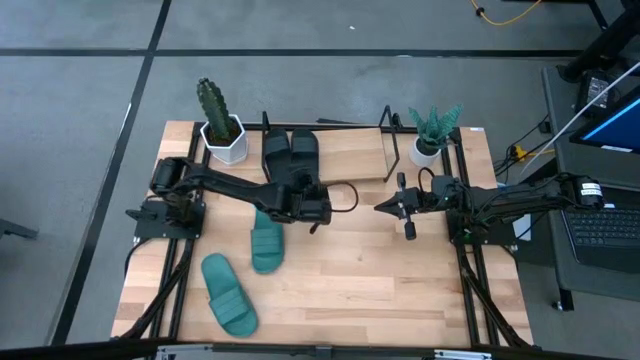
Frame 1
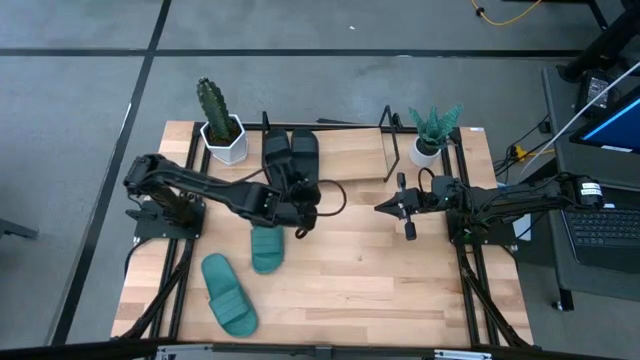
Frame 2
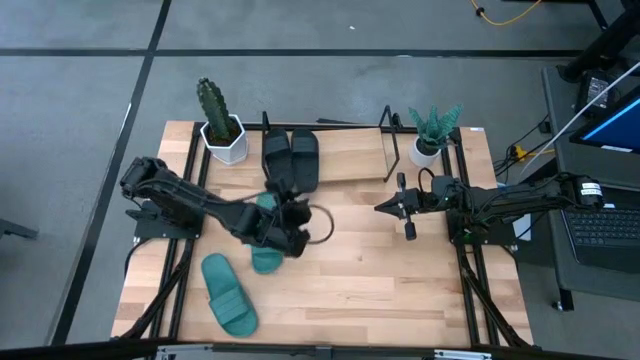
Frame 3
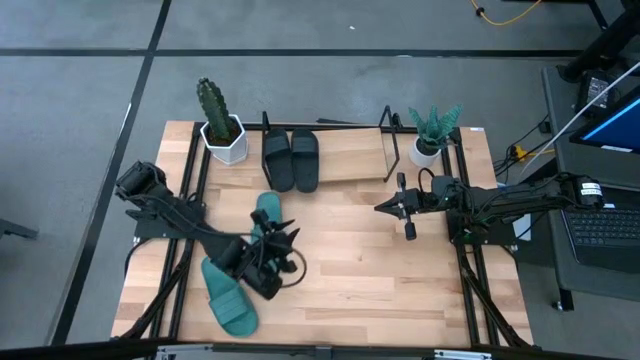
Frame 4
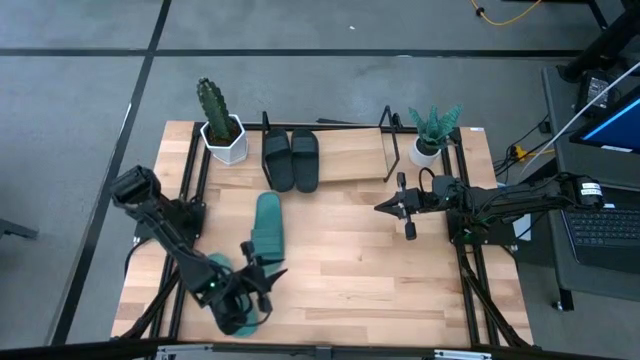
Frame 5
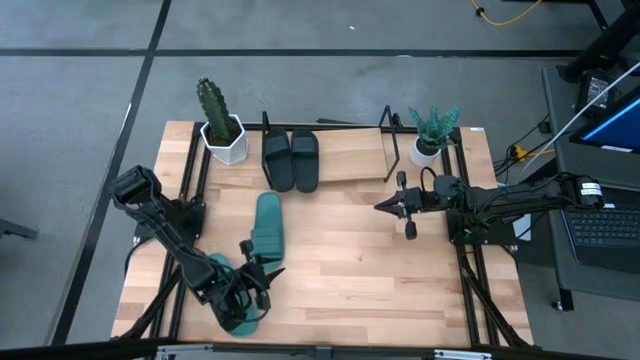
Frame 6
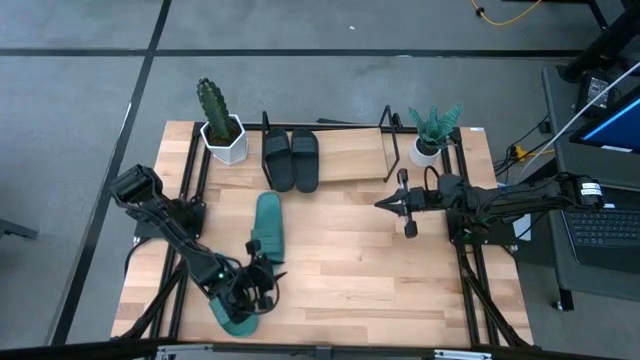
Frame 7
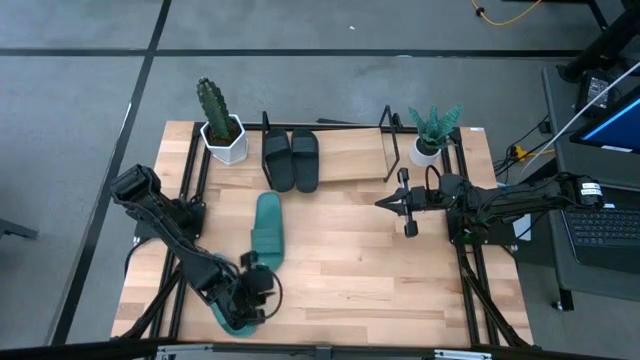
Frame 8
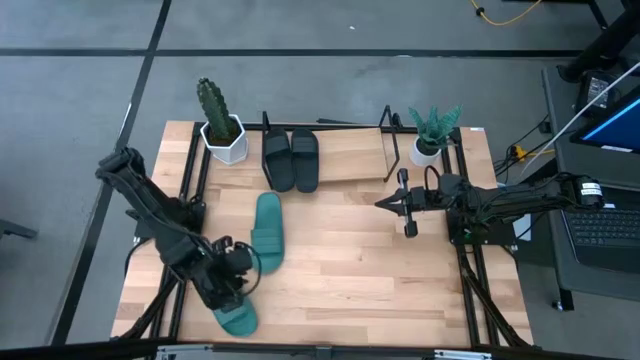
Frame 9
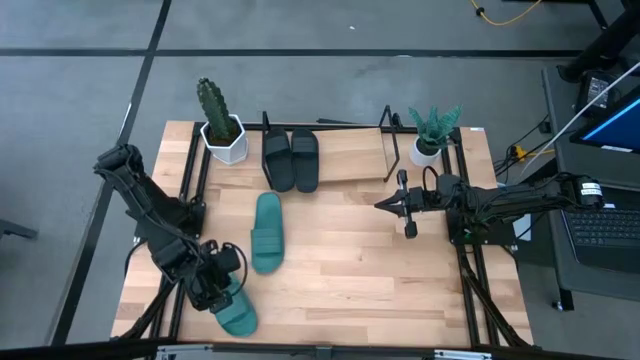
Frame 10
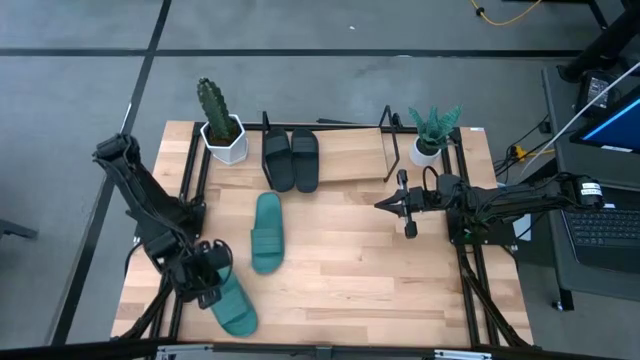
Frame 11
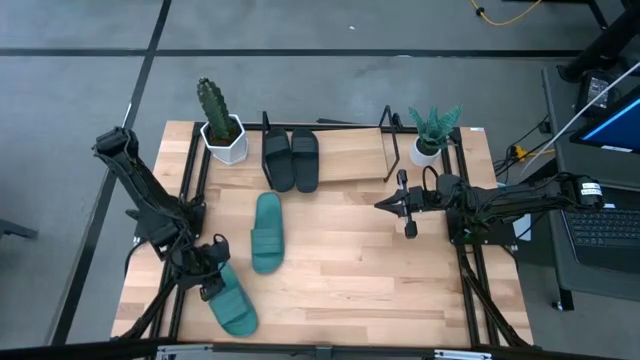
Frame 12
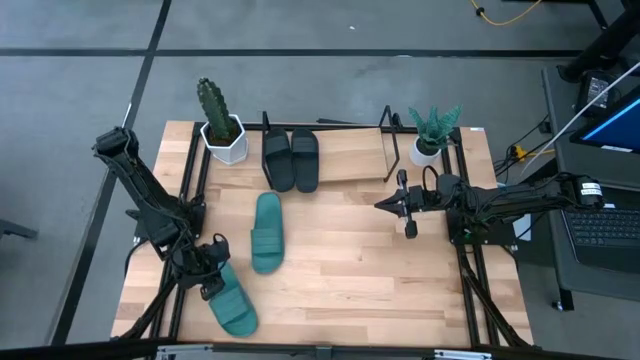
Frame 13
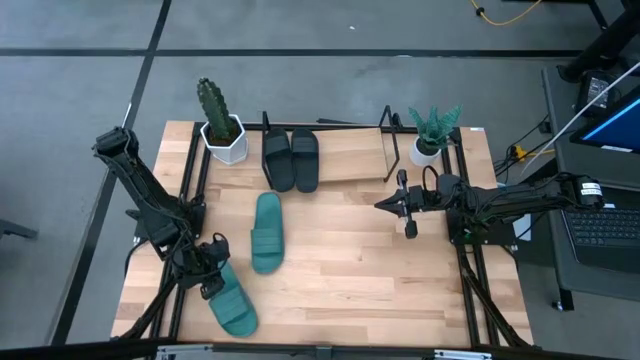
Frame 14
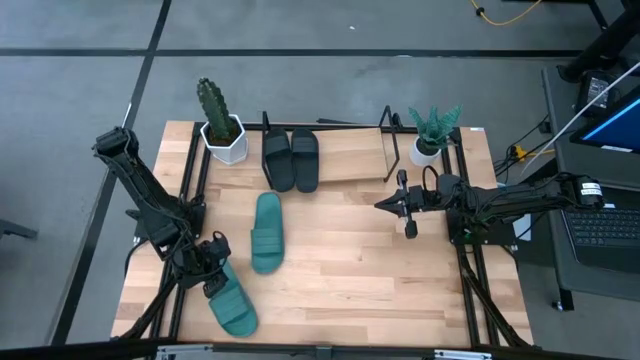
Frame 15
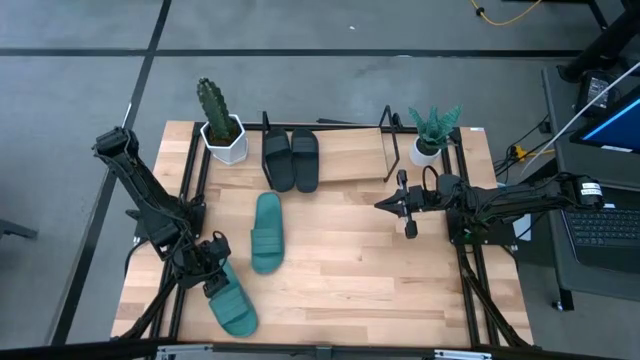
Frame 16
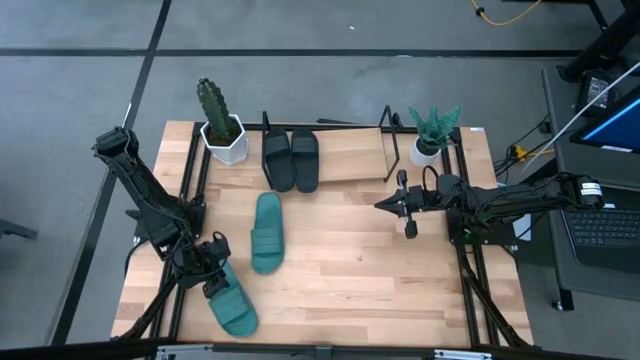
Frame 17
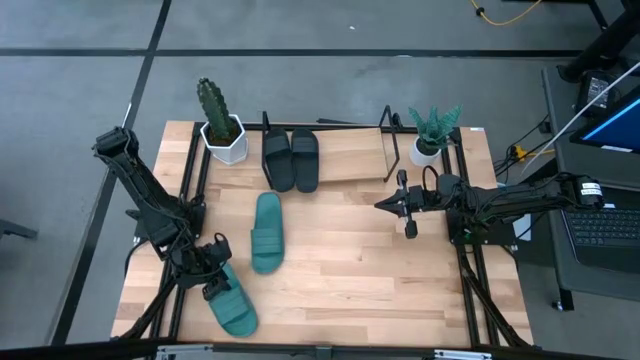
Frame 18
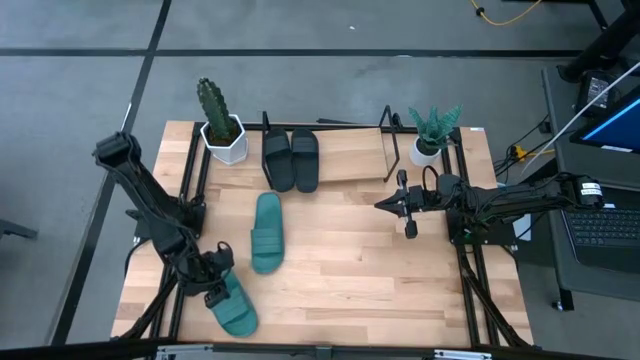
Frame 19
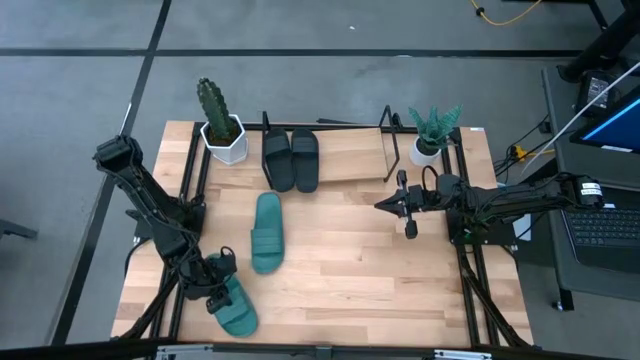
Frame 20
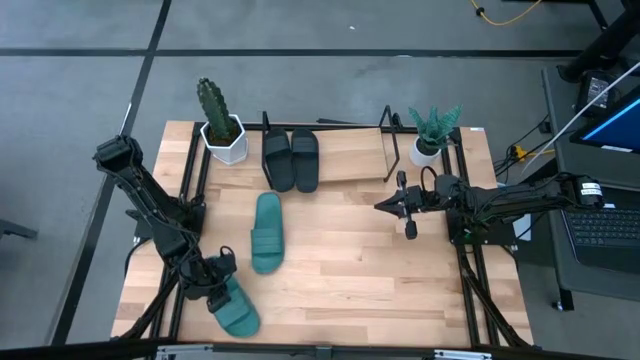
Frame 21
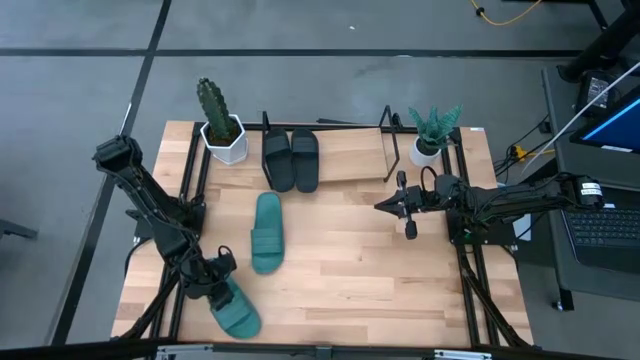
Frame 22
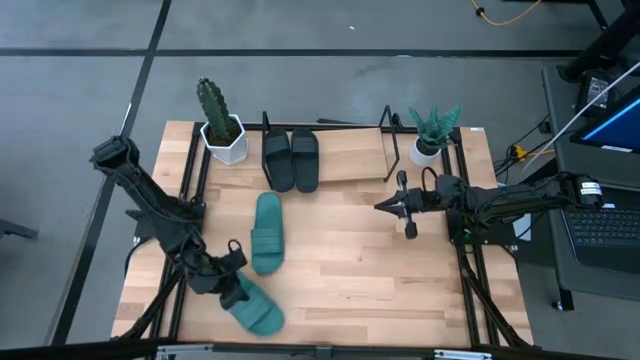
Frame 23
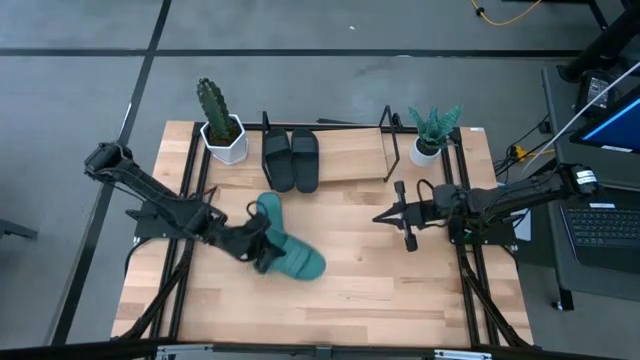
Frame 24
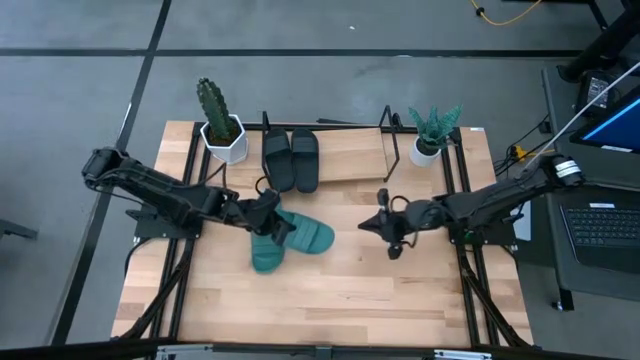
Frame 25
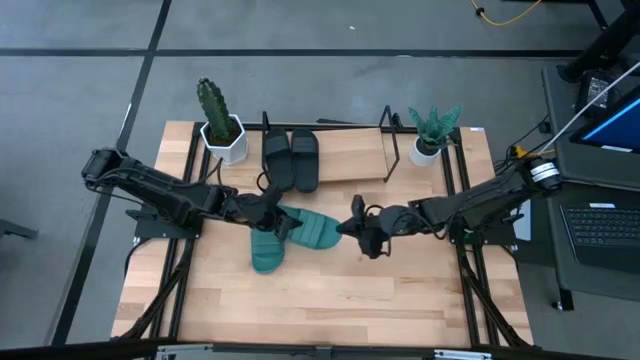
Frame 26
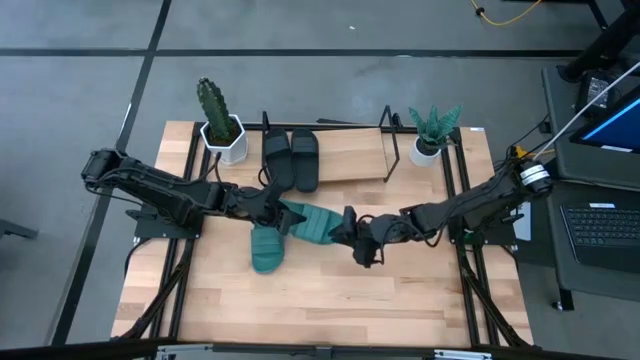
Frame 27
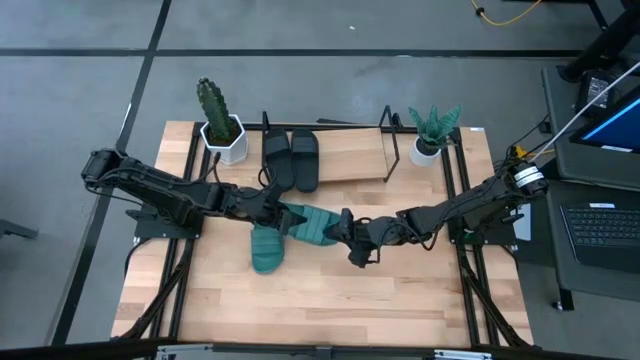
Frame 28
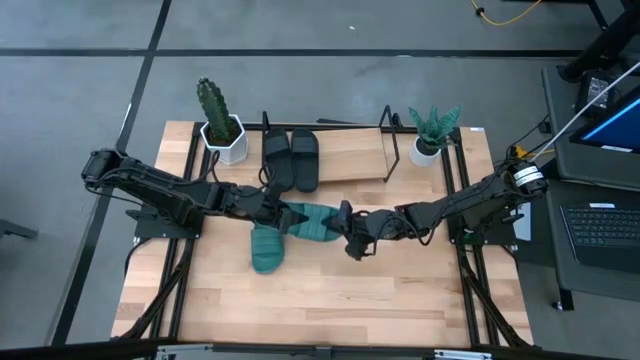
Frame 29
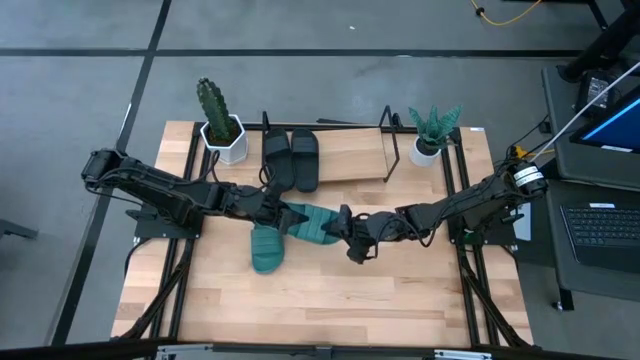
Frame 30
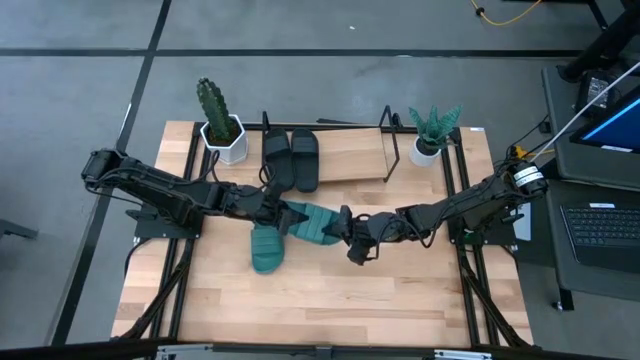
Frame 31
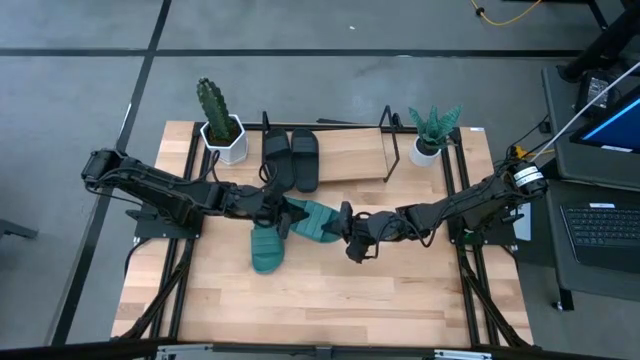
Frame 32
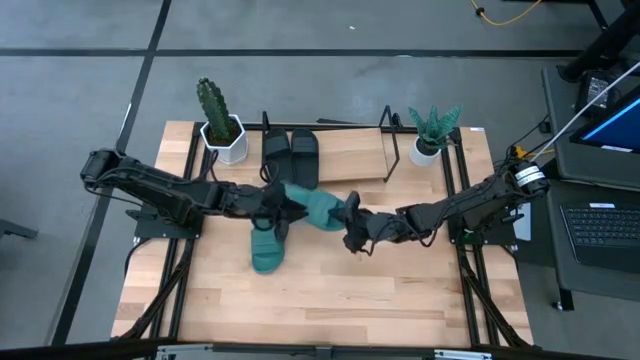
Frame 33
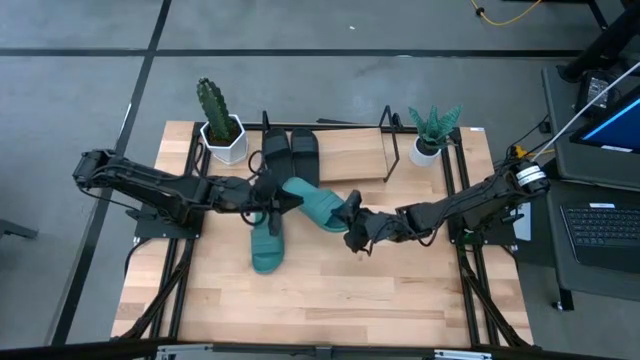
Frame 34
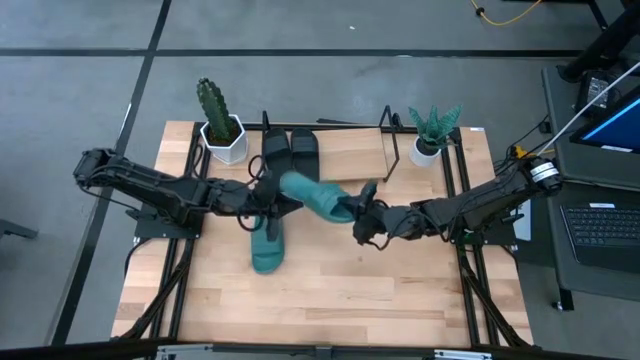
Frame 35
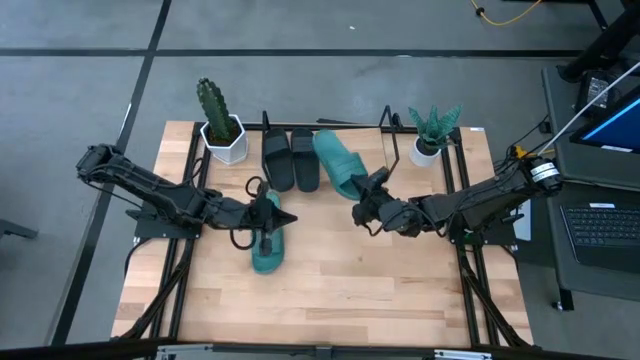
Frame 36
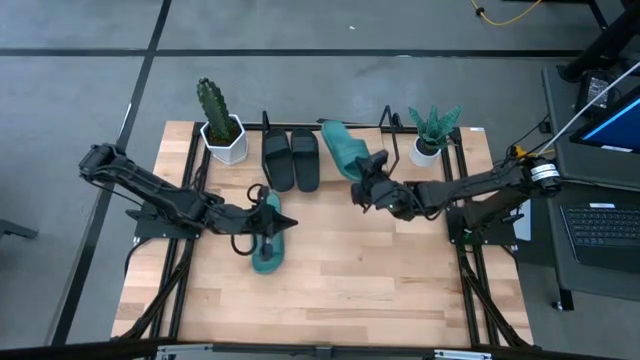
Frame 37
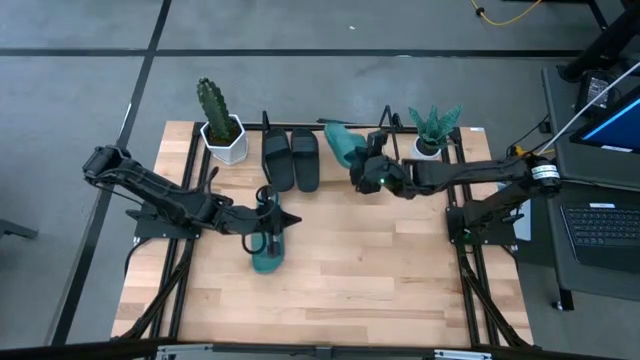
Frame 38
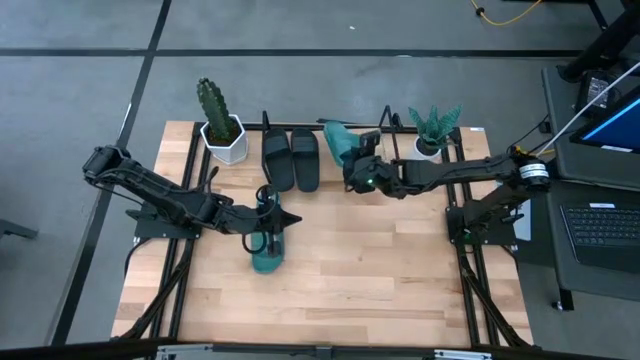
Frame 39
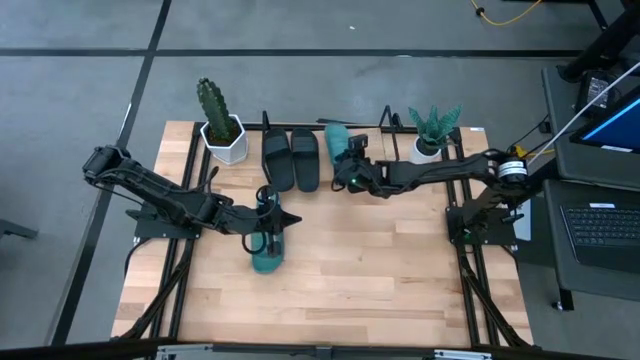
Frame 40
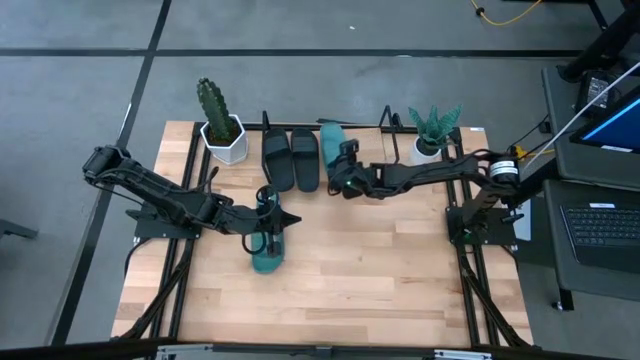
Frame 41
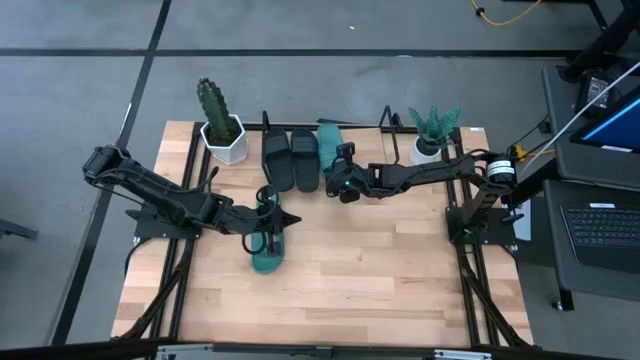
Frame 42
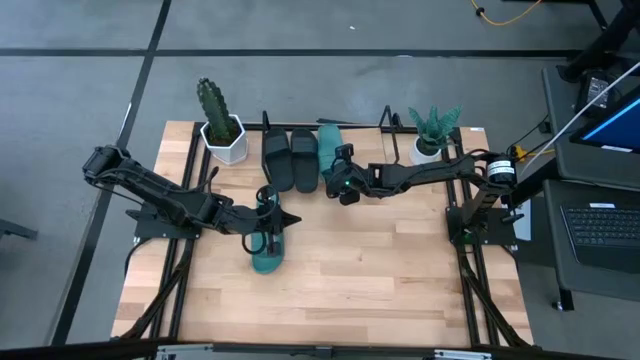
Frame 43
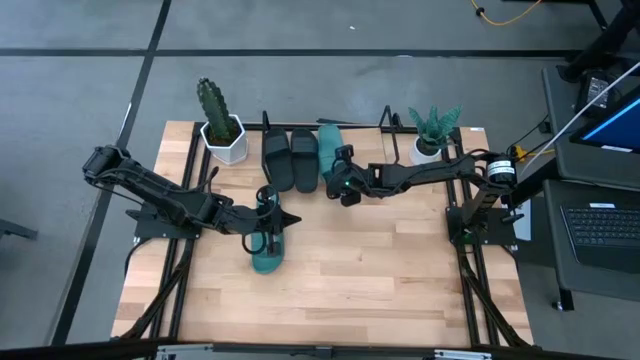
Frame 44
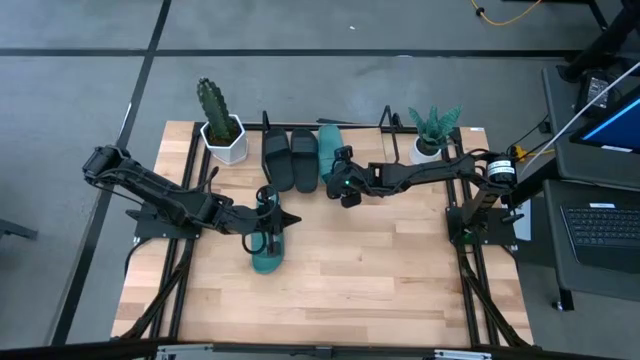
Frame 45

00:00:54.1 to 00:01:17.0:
Task: Pick and place slides into the shelf
Put the left green slide on the shelf
